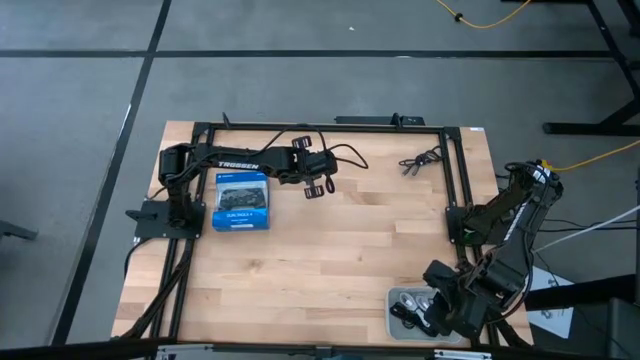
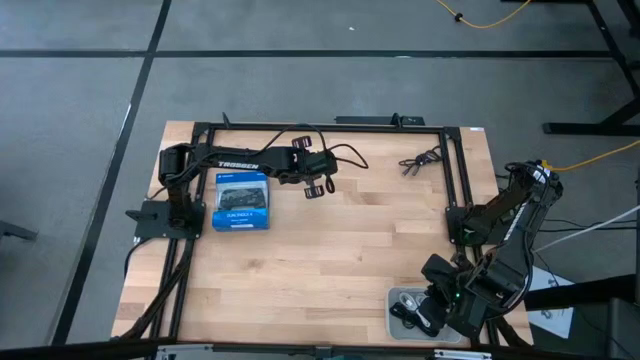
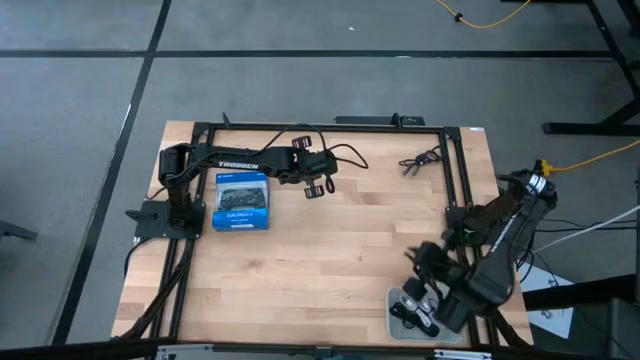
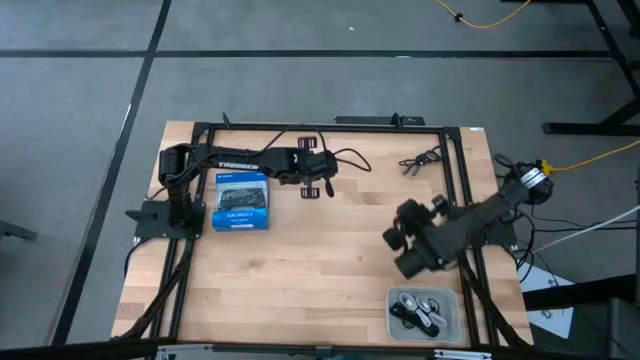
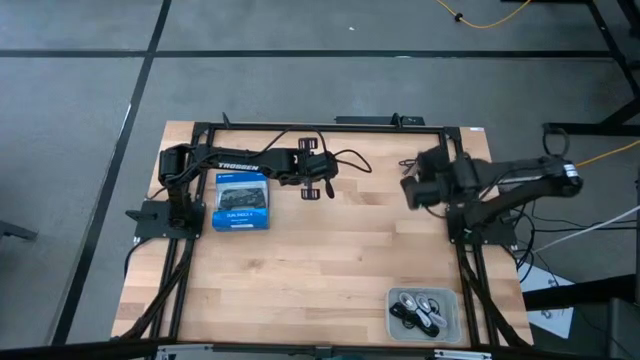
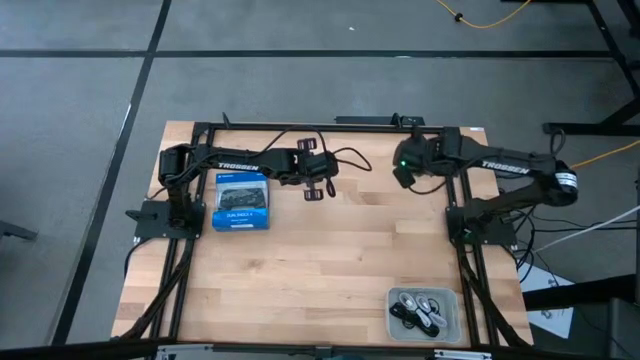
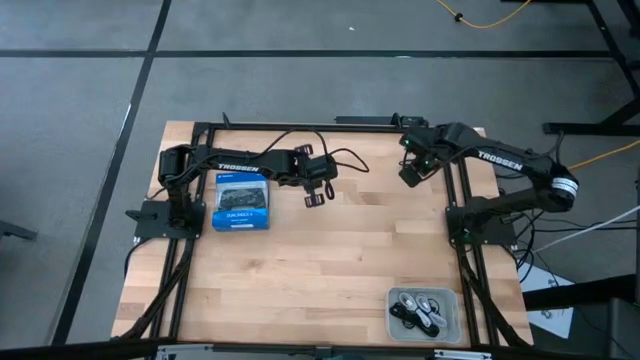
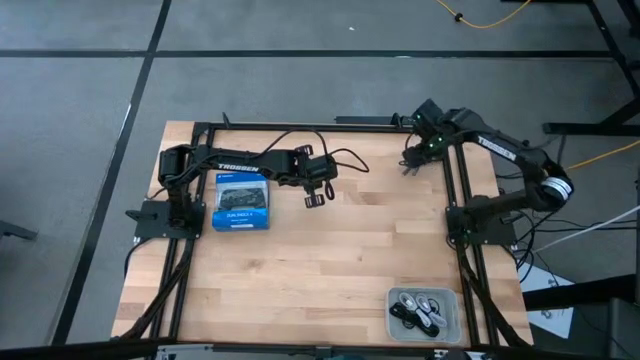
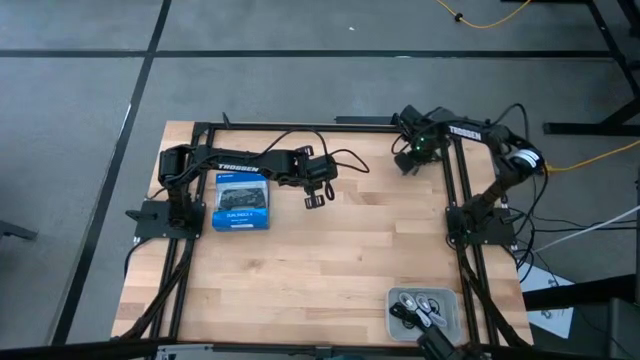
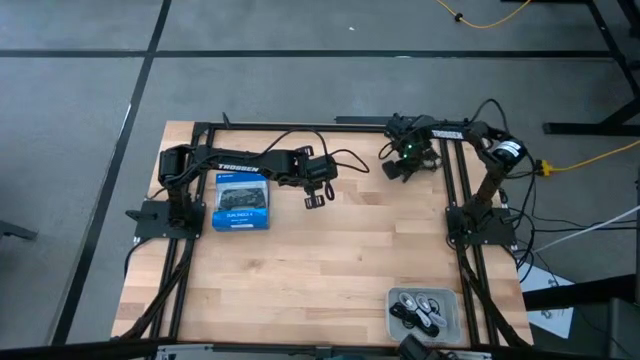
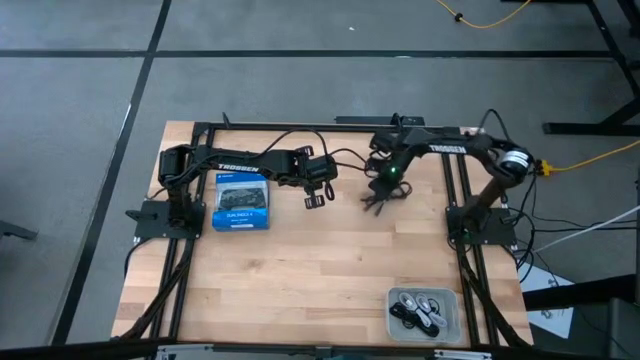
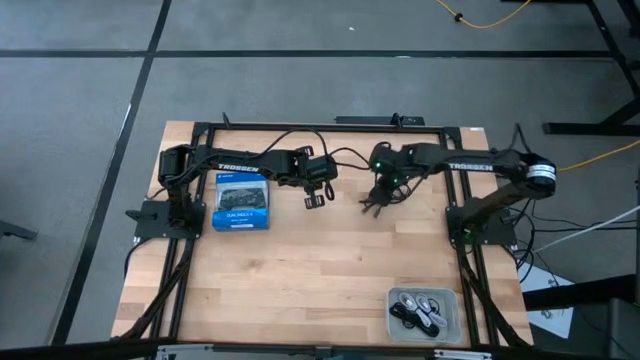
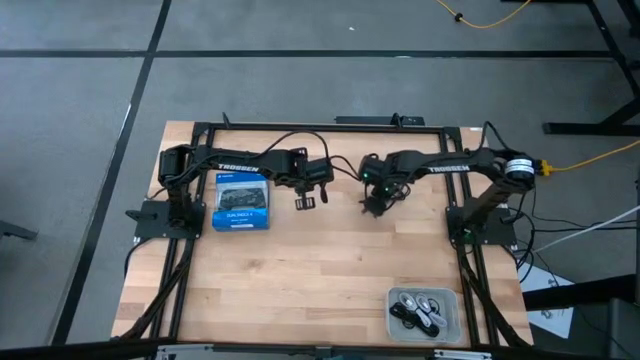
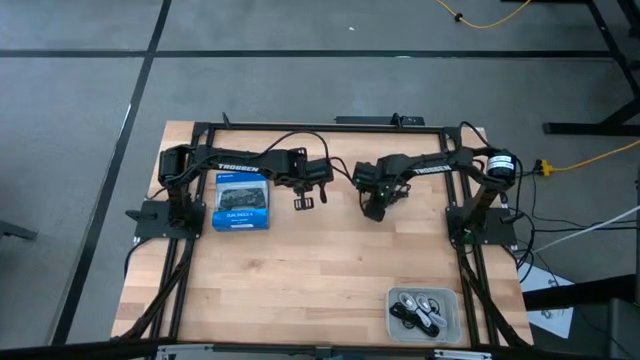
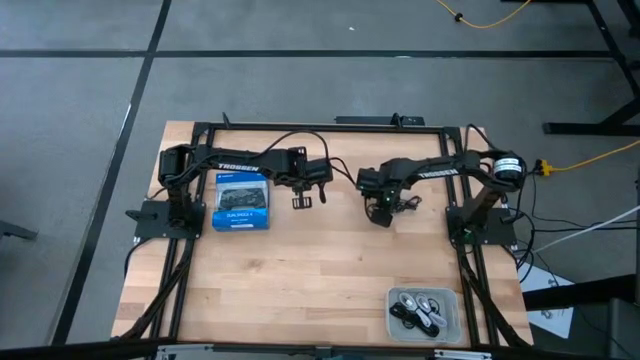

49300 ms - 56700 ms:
Task: Pick and place USB-C Cables
Put the black charger cable into the white bin

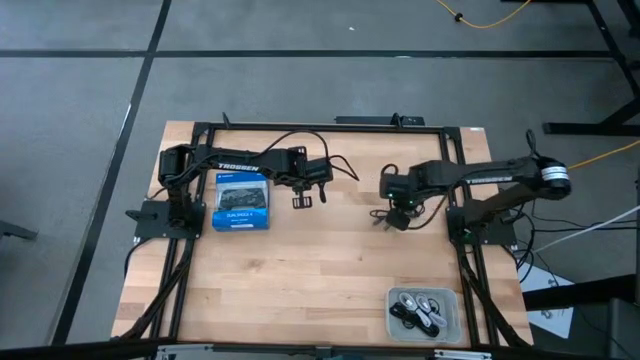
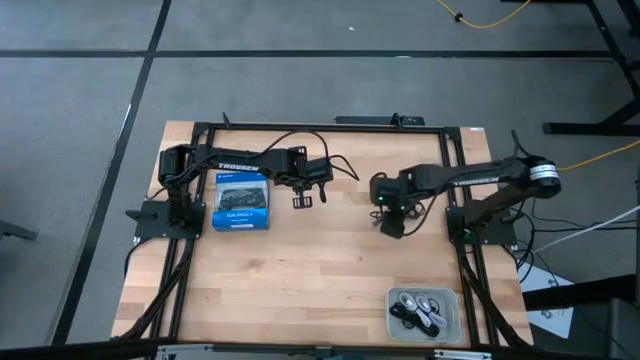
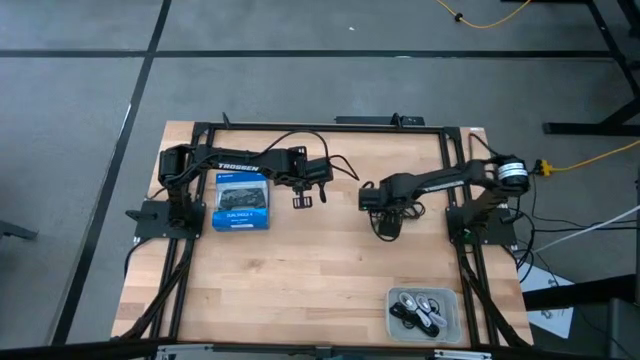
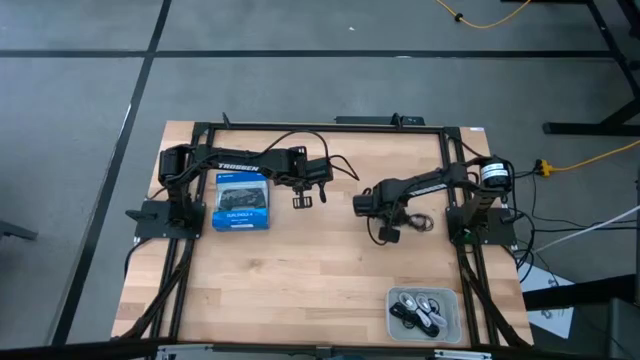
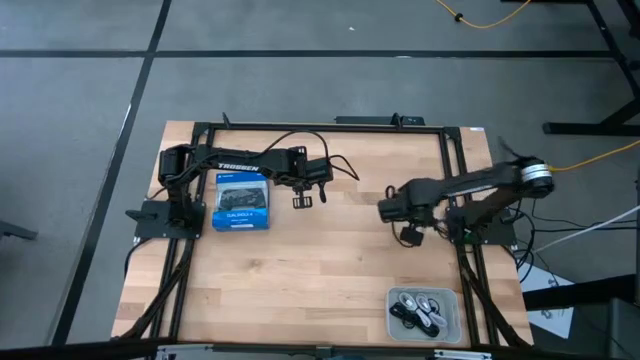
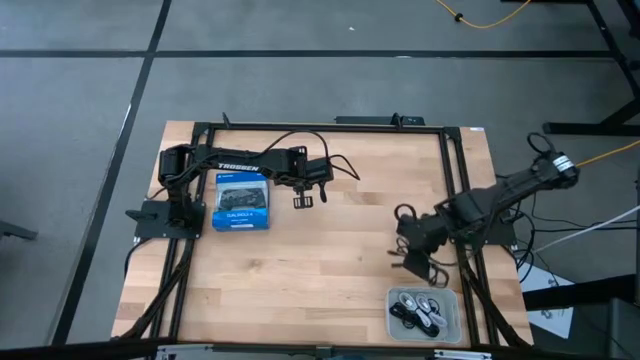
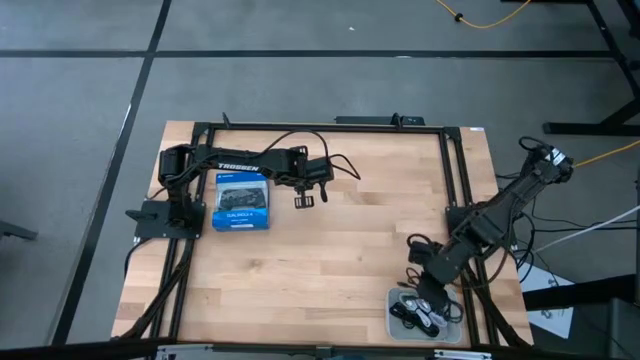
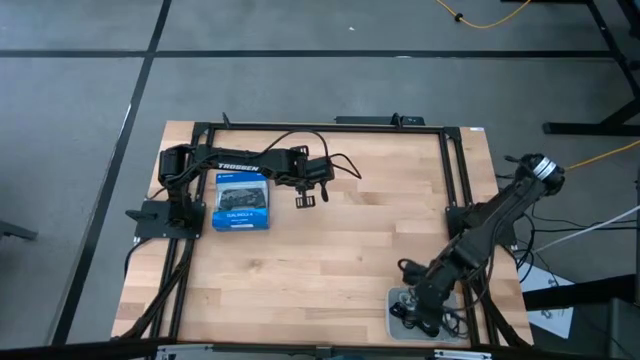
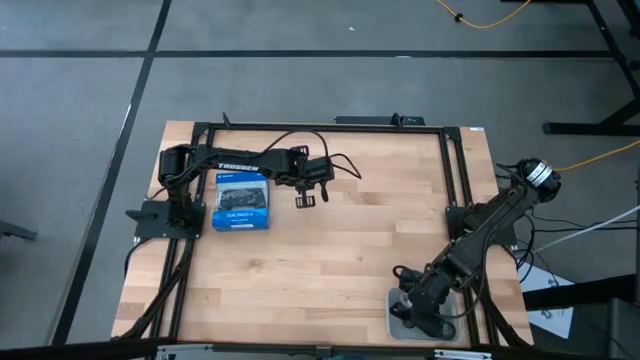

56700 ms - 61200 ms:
Put the black charger cable into the white bin

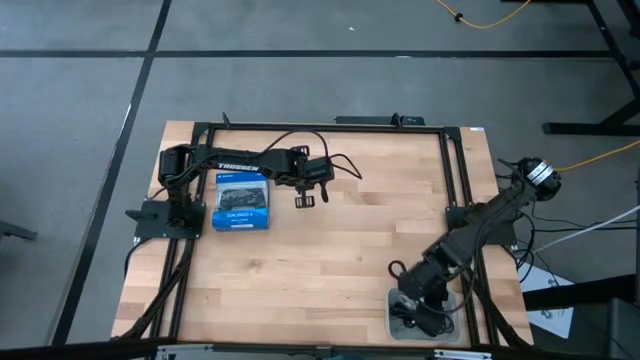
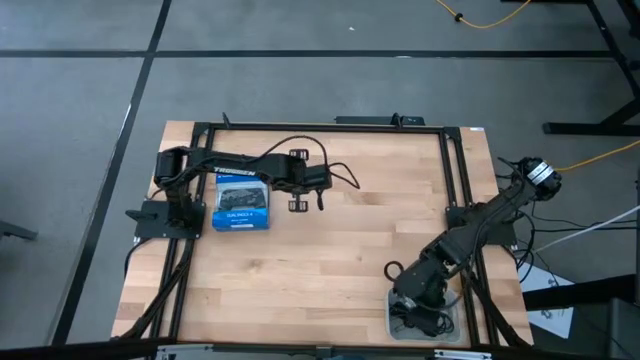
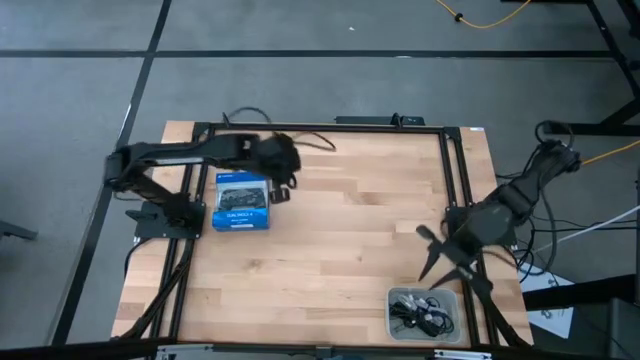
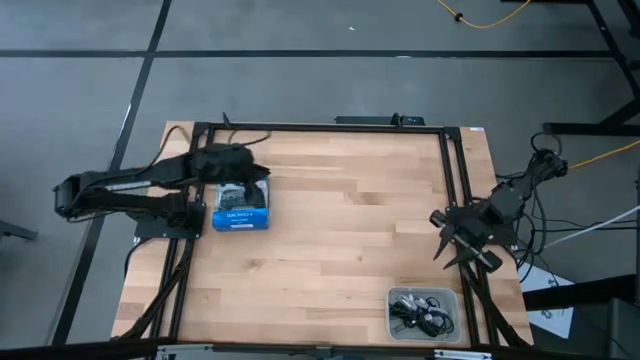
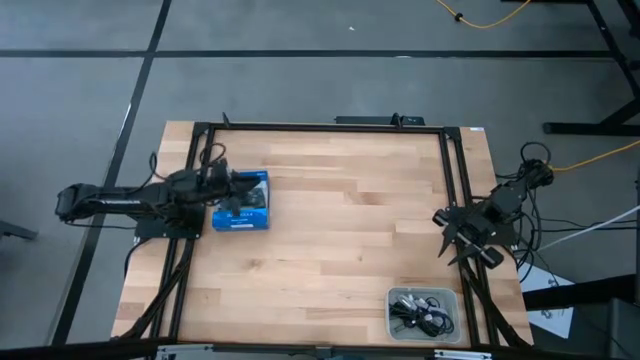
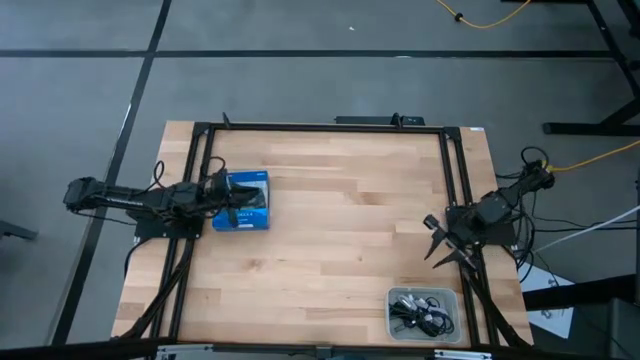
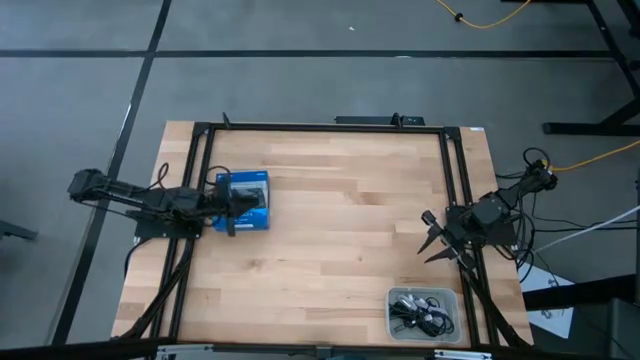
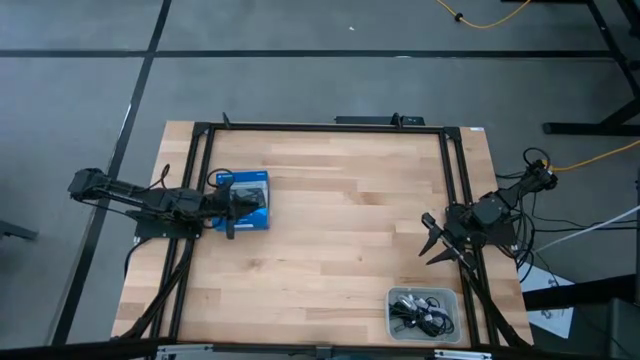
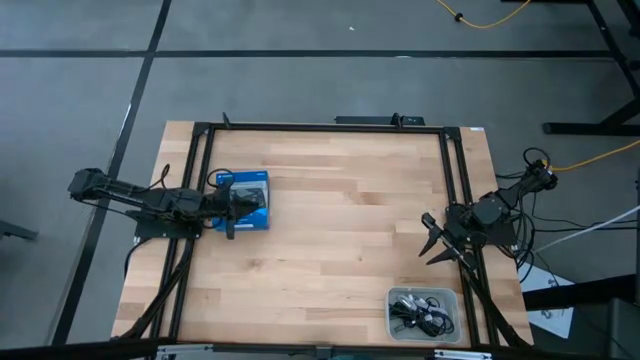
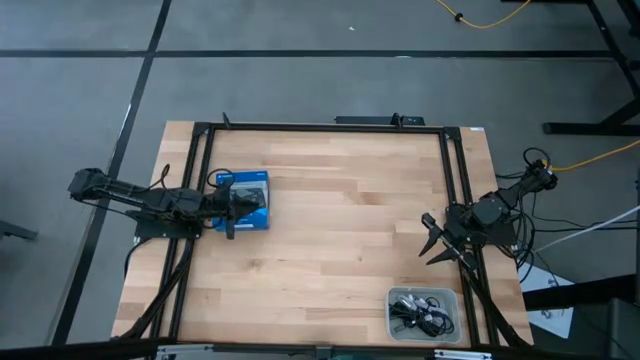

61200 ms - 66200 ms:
Return to Home Position

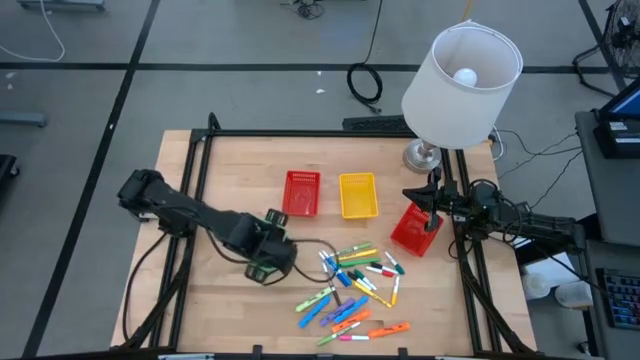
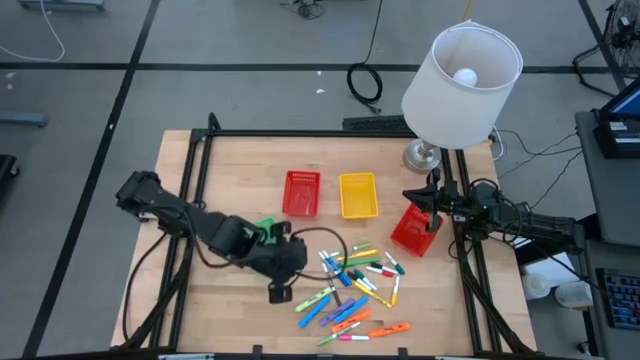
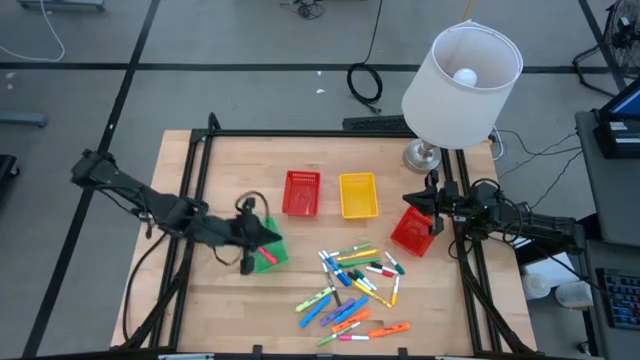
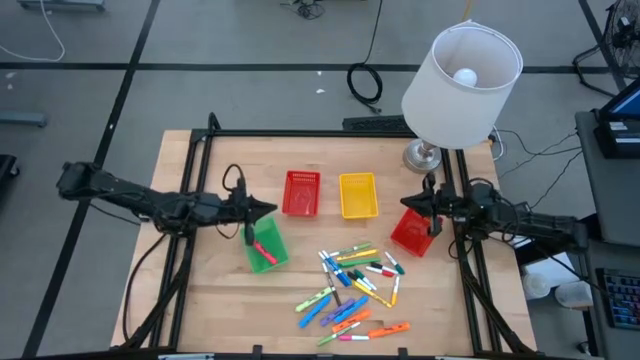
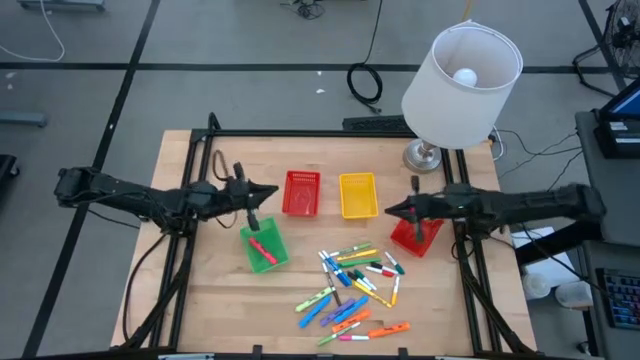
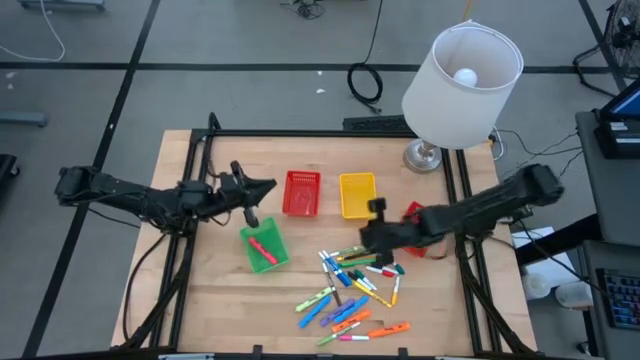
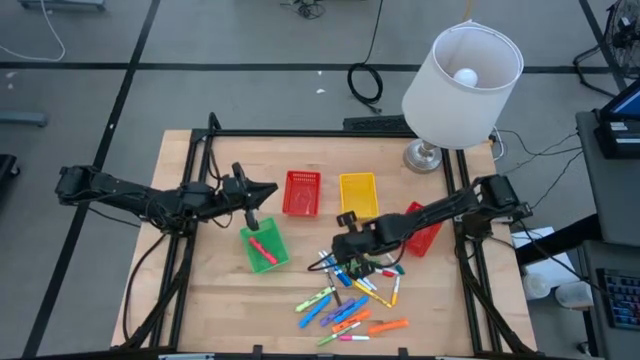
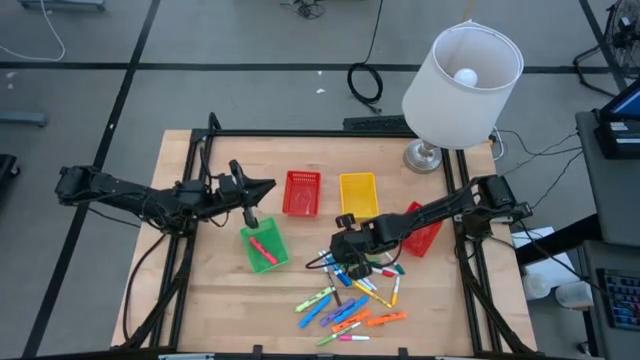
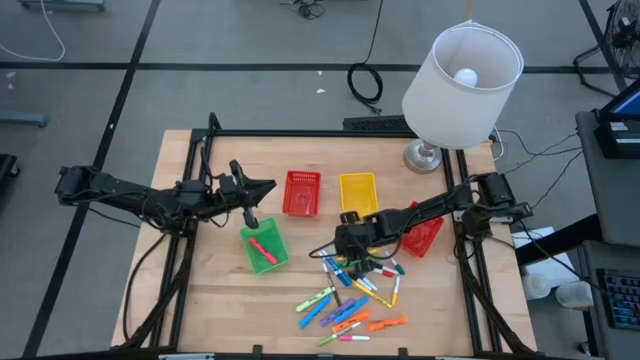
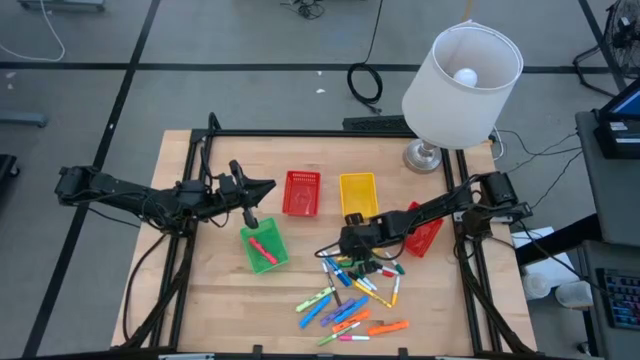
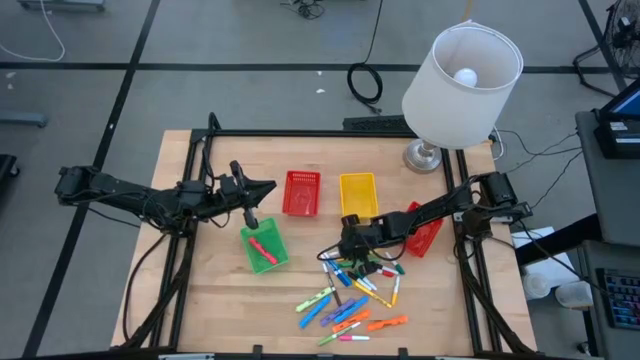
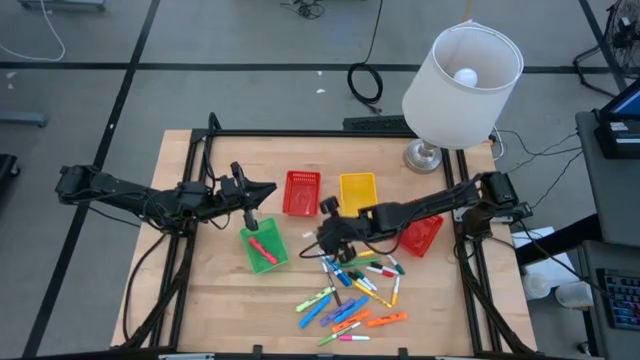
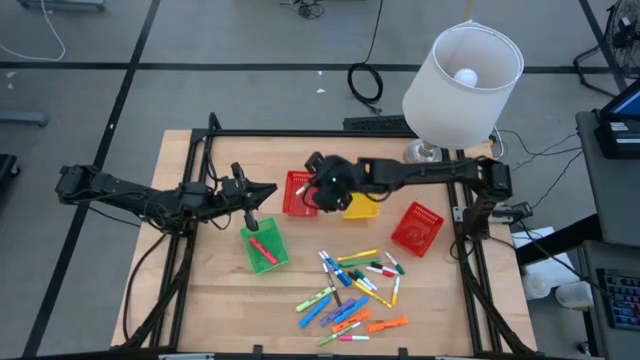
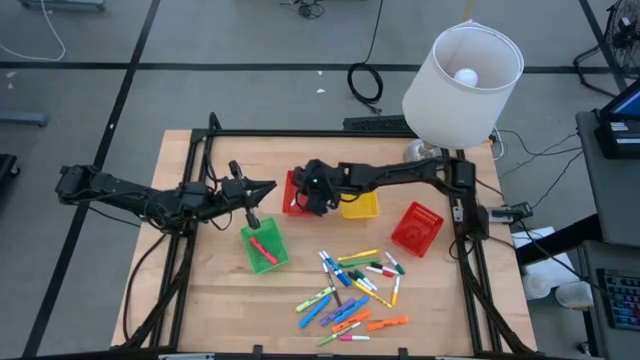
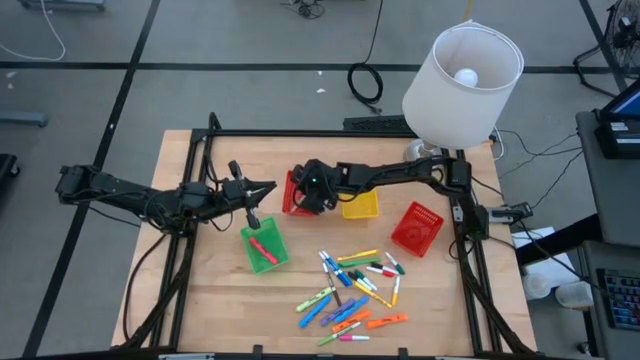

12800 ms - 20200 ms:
Task: Pick & Place Markers
Put the top green marker into the left red bin
